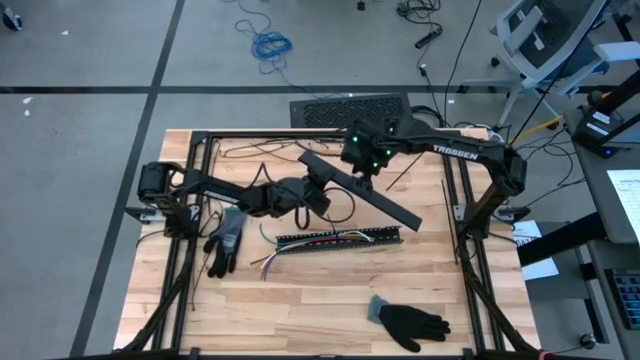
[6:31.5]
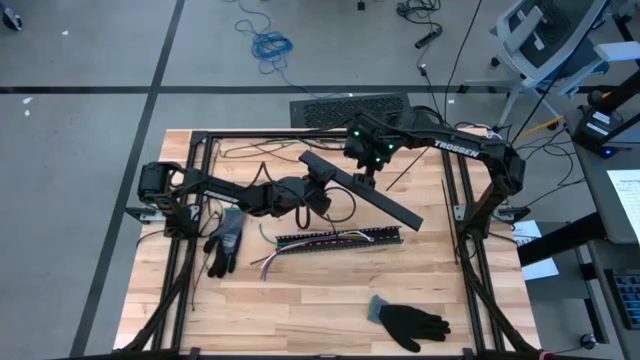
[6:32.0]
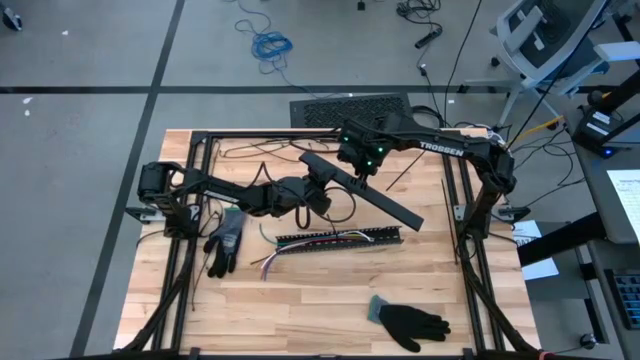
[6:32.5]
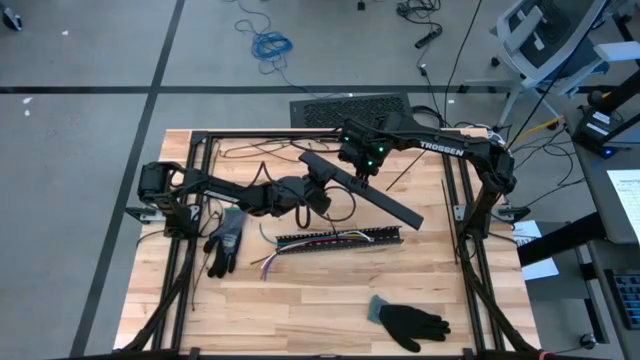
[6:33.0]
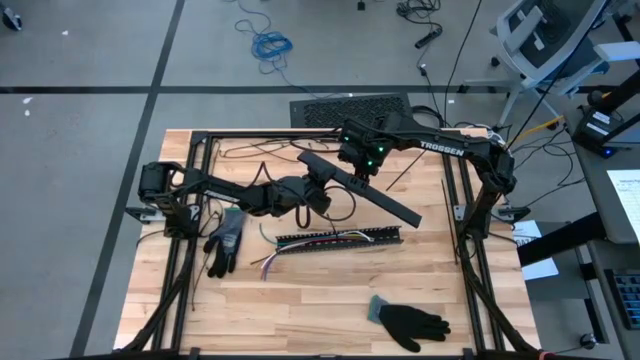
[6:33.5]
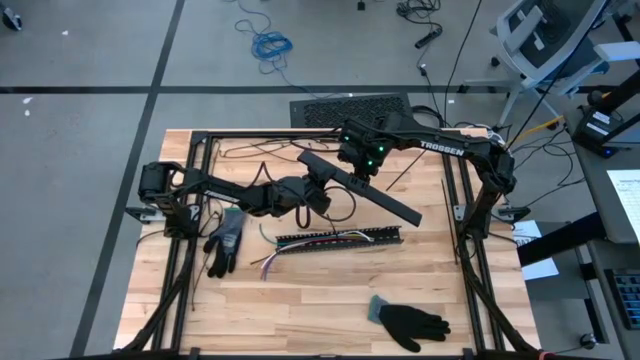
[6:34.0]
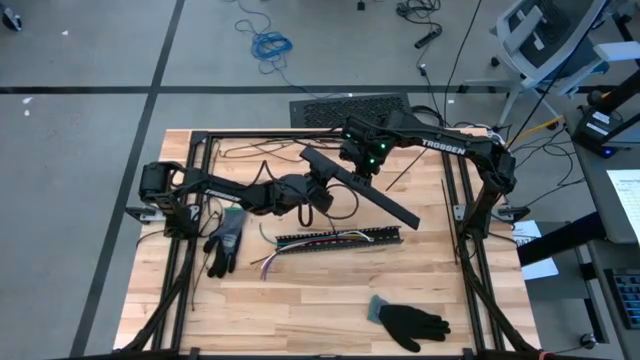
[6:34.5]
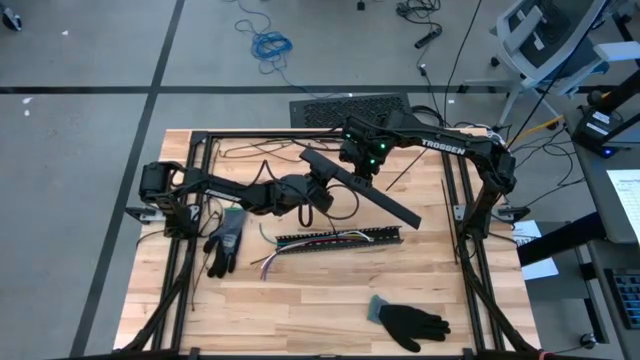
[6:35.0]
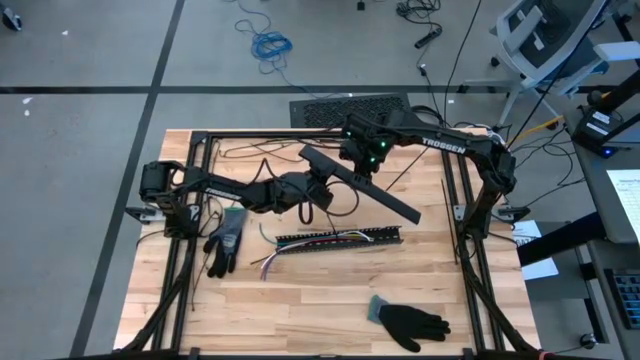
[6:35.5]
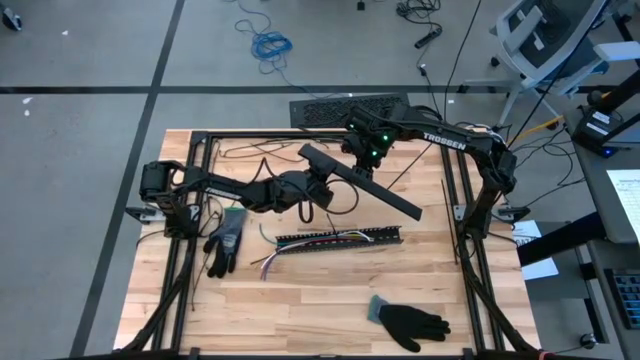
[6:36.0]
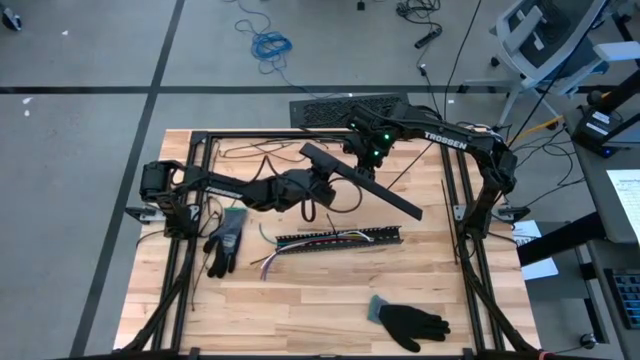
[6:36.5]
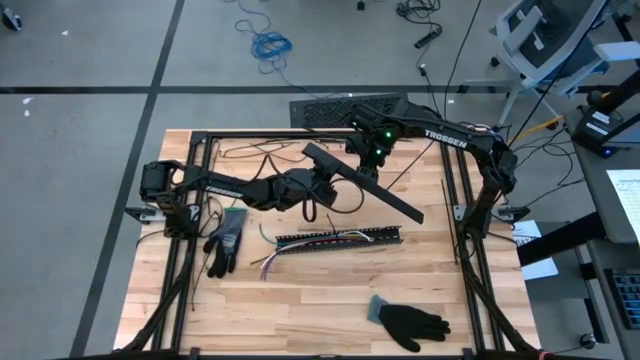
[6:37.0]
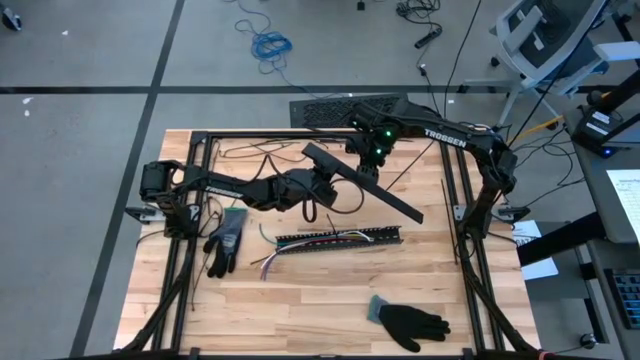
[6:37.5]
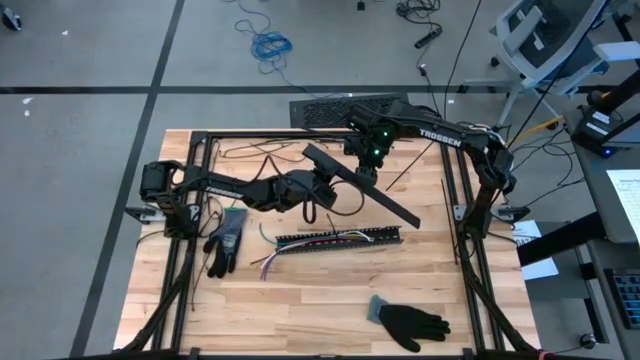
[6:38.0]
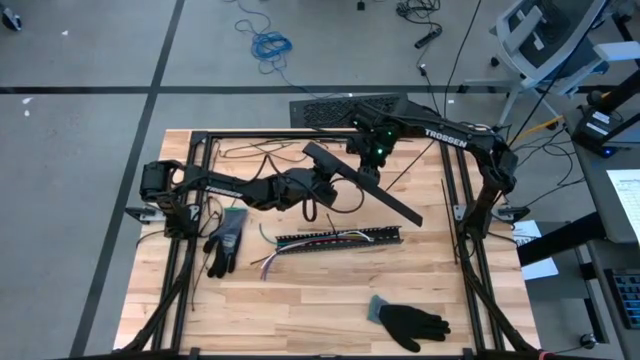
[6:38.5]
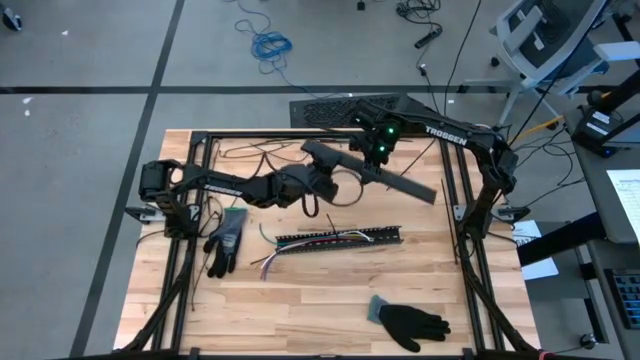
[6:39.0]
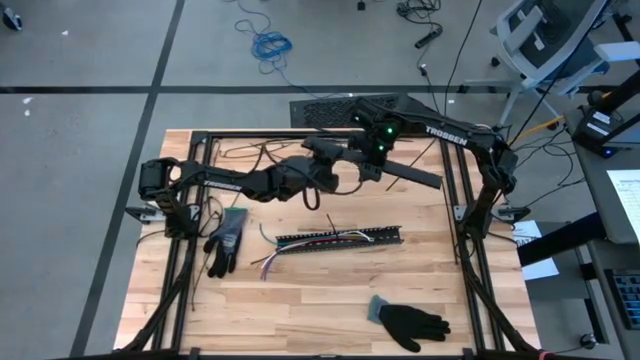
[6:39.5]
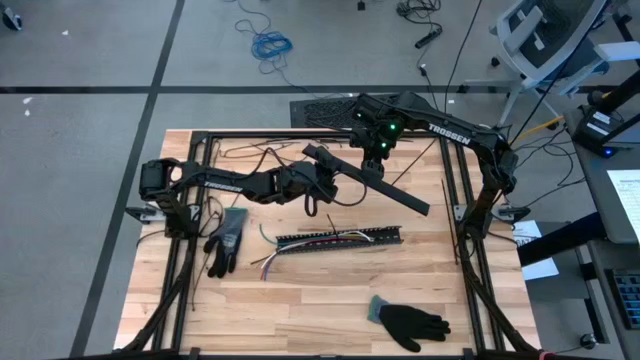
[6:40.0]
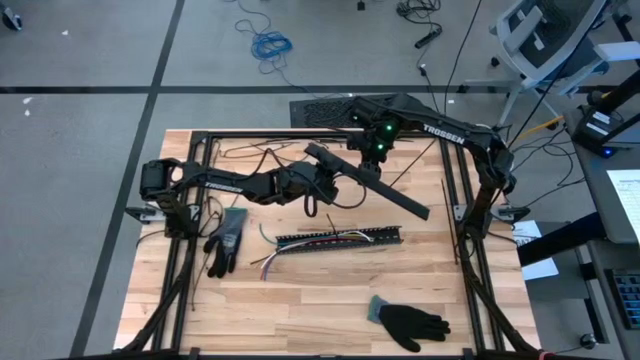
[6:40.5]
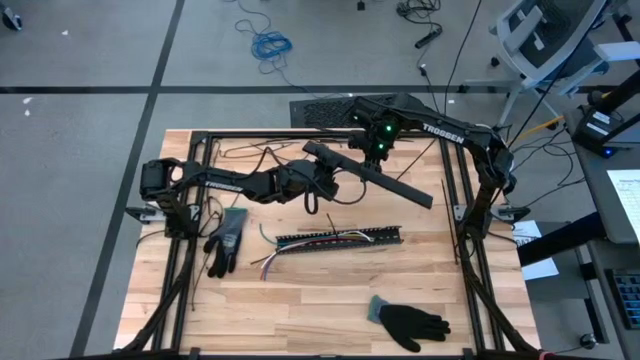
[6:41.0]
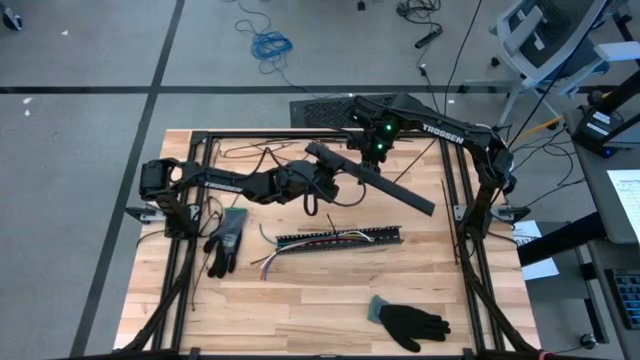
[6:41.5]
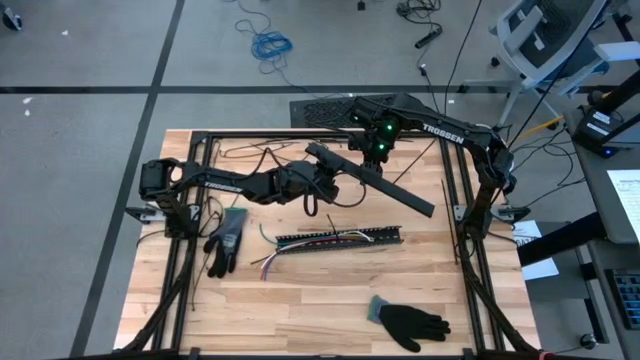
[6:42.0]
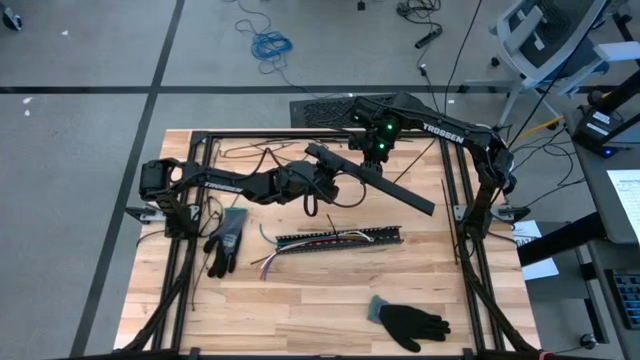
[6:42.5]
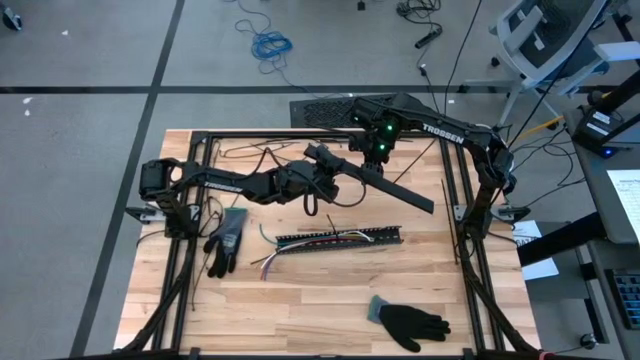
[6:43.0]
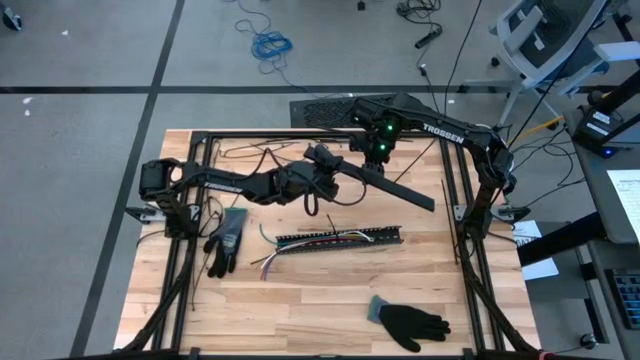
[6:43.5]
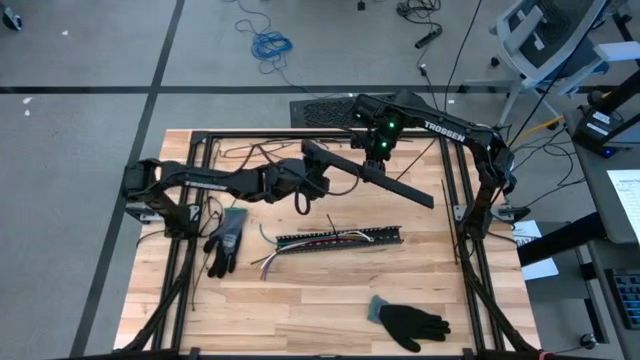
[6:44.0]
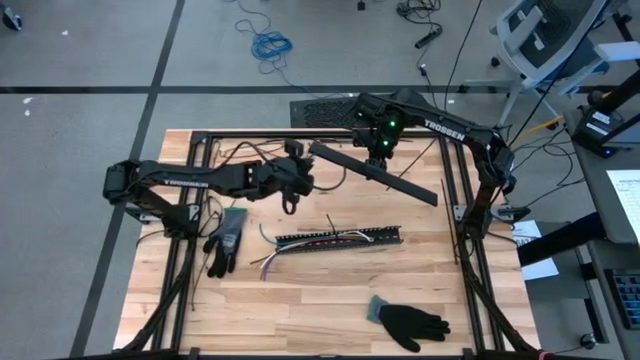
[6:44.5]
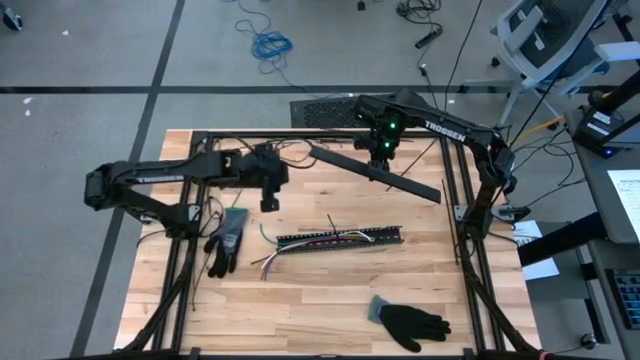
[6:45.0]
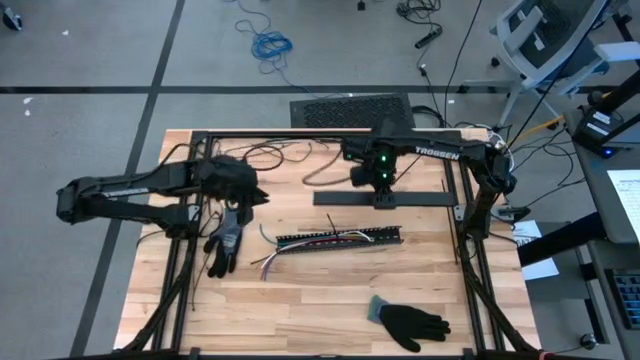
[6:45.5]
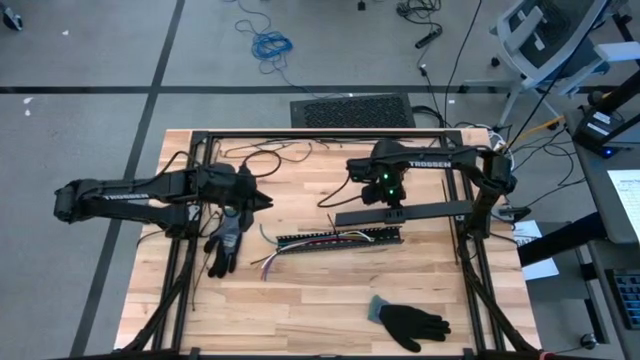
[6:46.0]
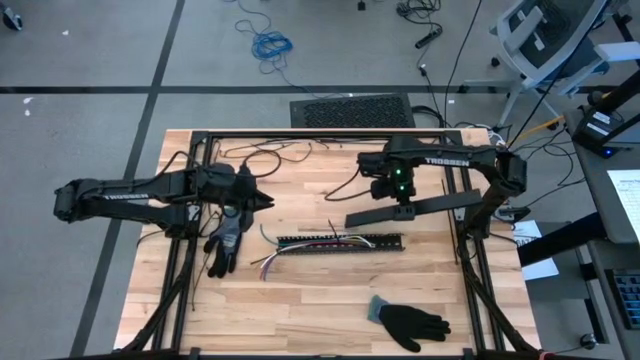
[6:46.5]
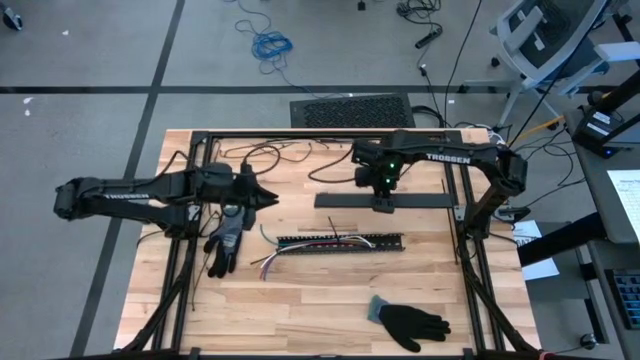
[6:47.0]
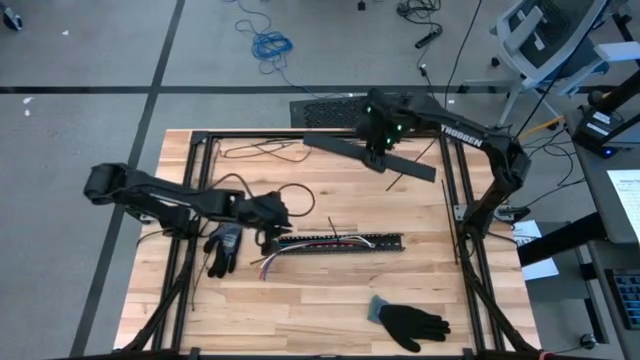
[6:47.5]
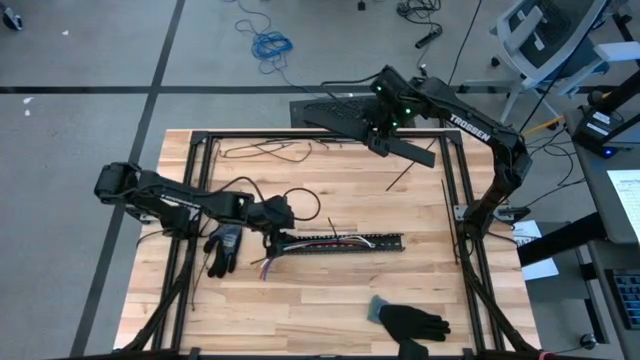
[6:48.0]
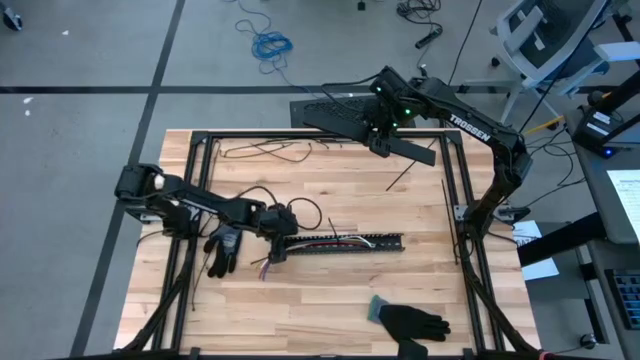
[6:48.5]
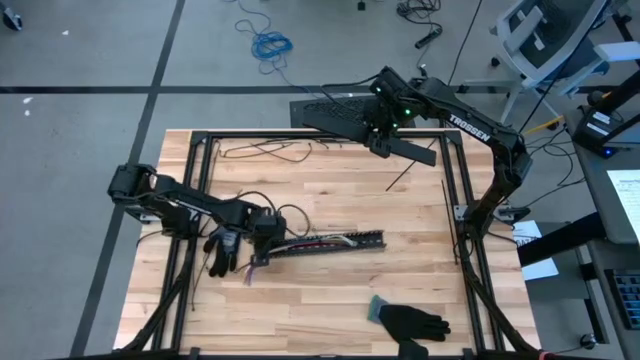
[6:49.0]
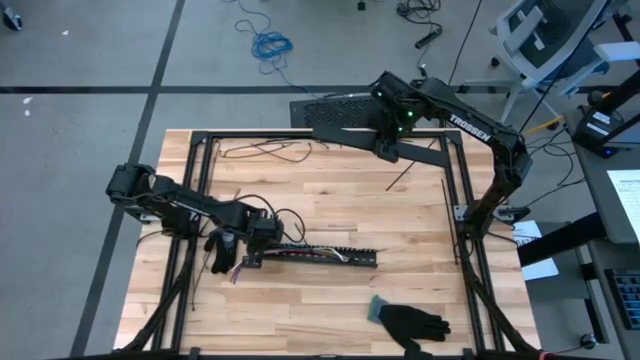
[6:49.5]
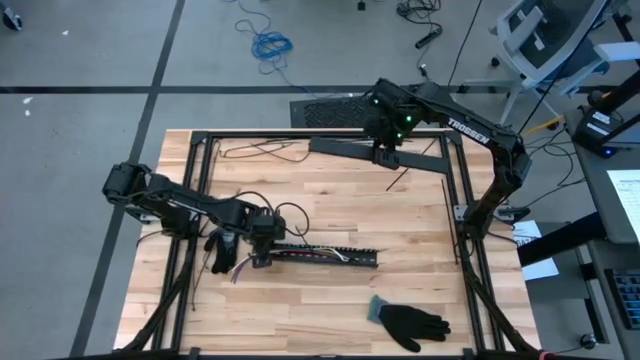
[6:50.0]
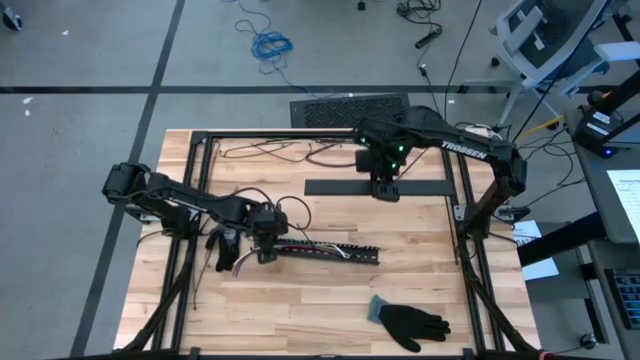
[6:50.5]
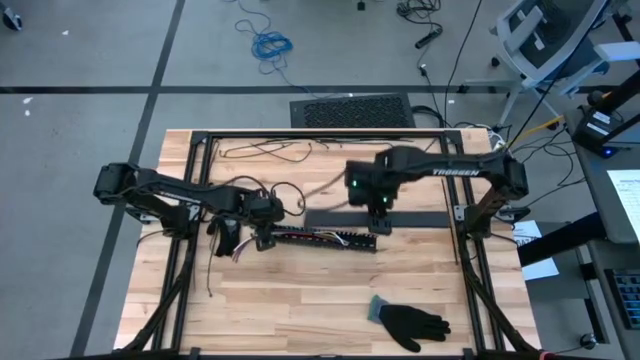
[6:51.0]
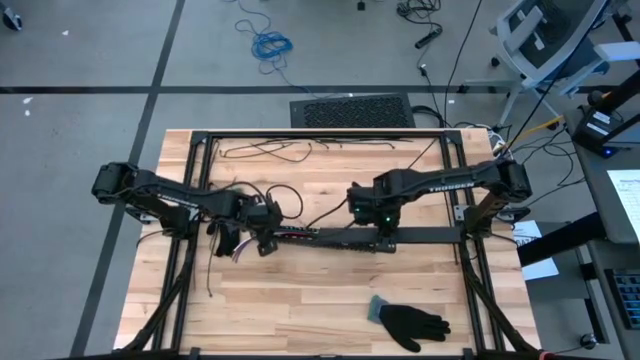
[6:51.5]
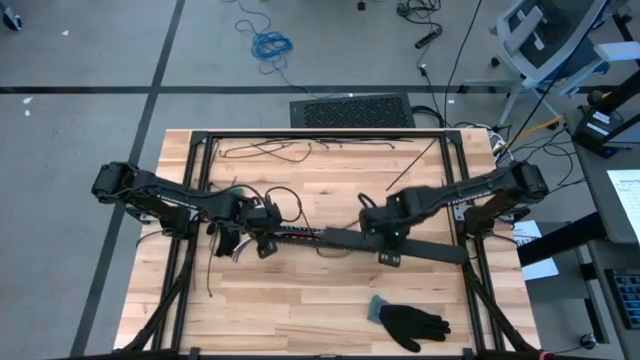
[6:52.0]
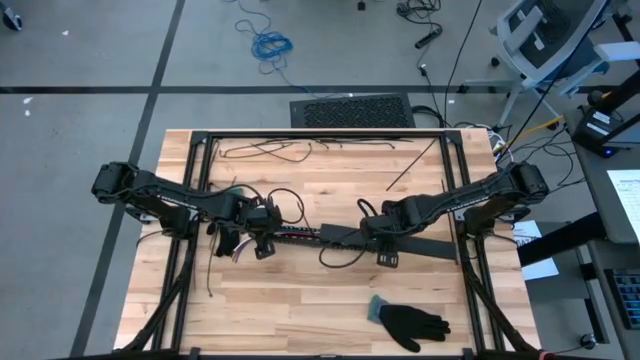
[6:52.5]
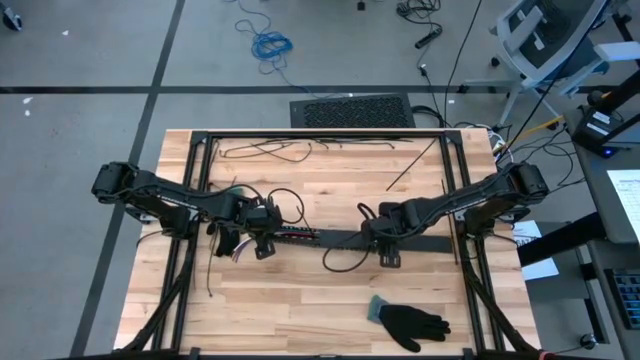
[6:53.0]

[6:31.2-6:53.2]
Task: Ziptie cables
Close the cable duct with the cable duct cover
